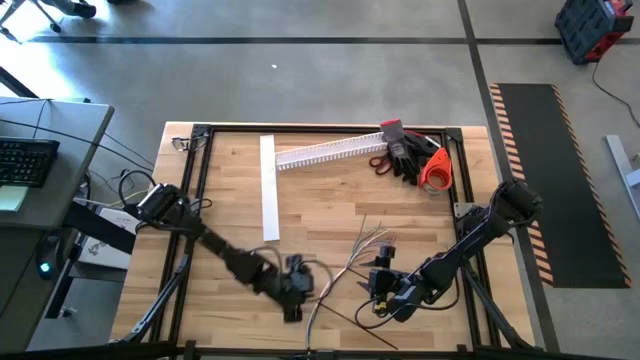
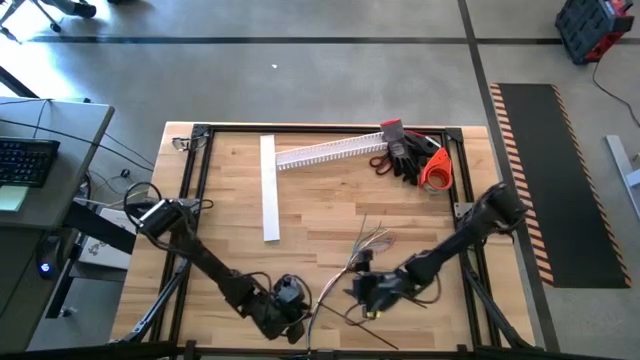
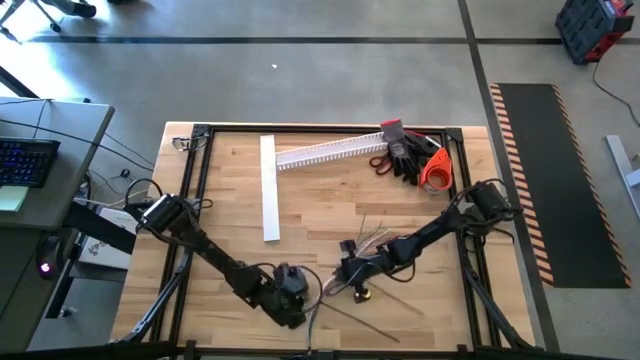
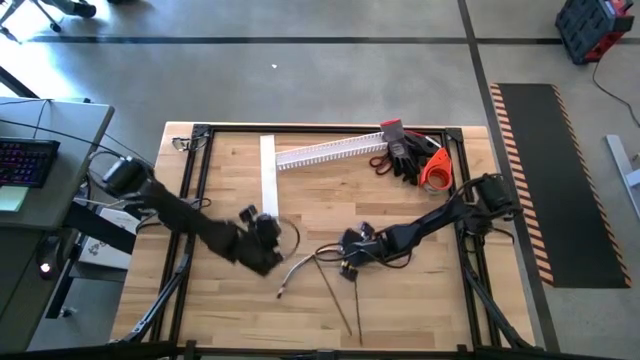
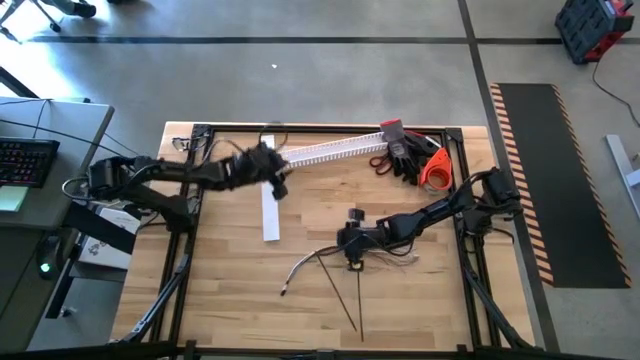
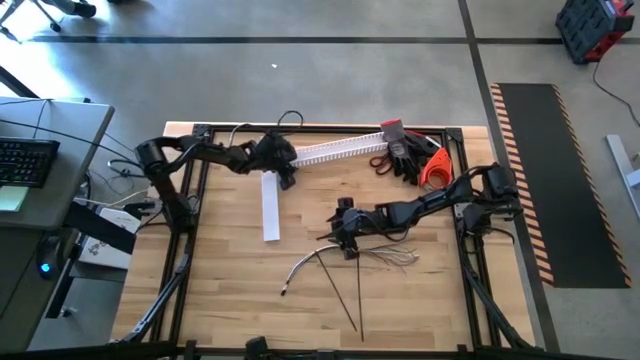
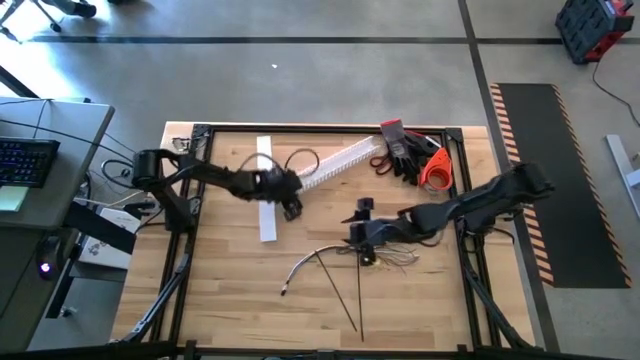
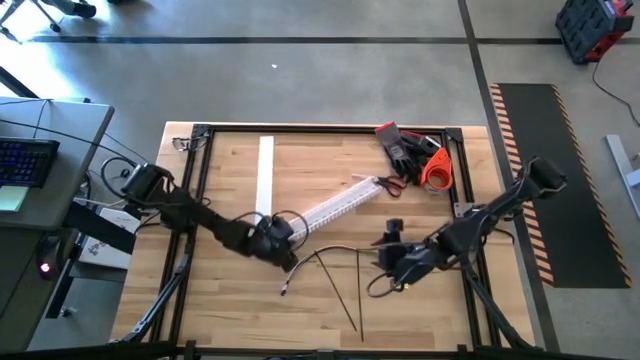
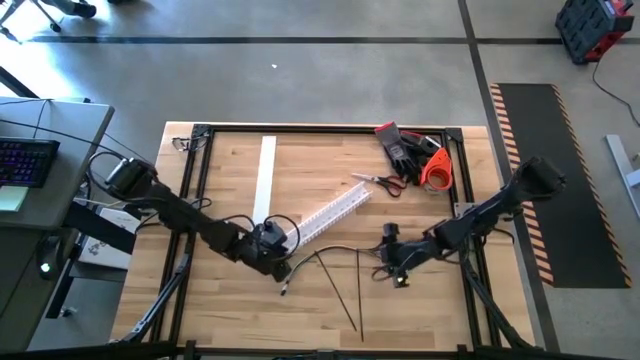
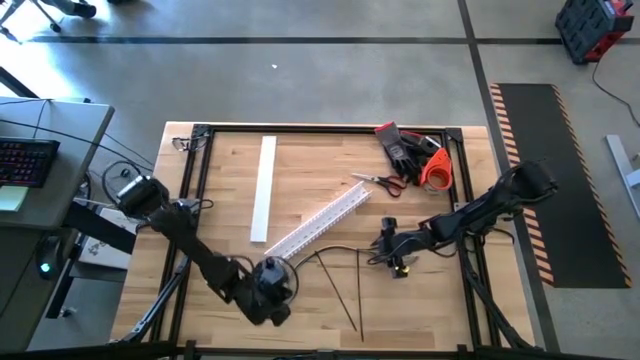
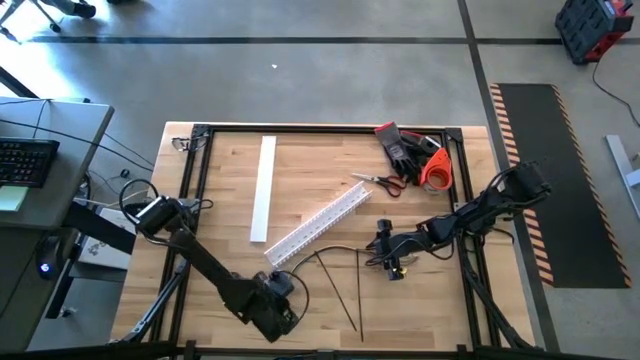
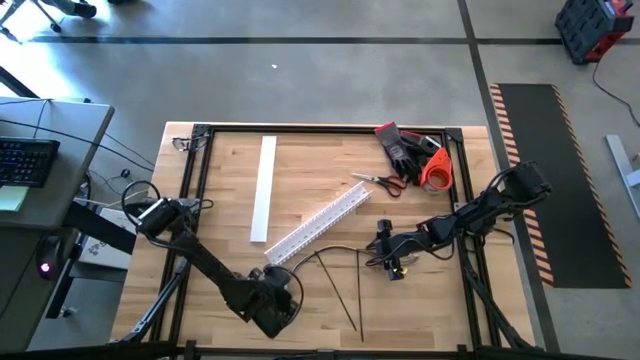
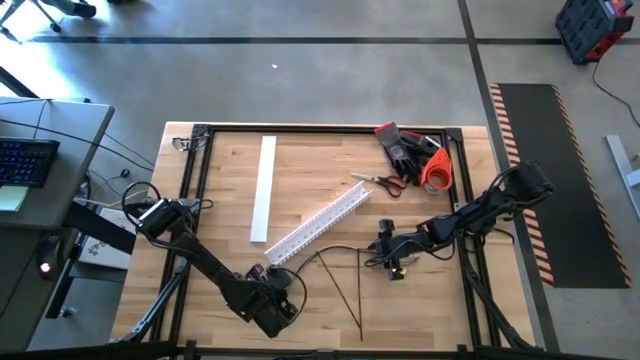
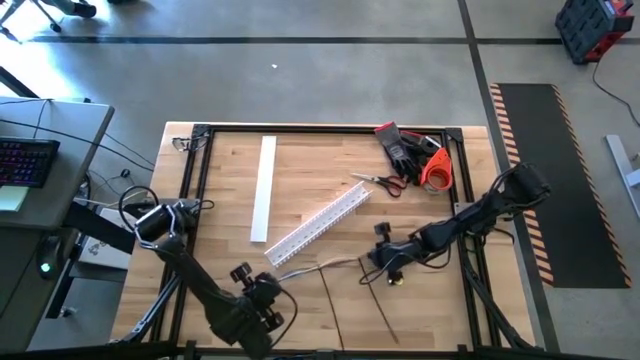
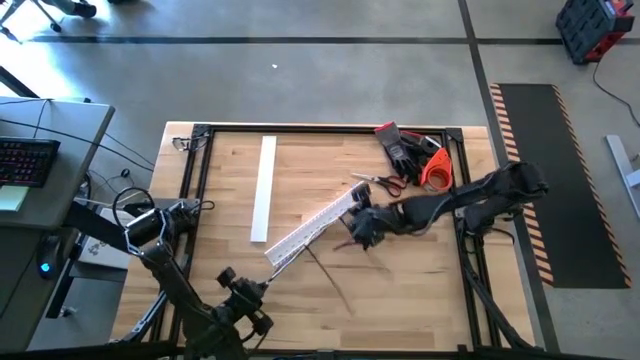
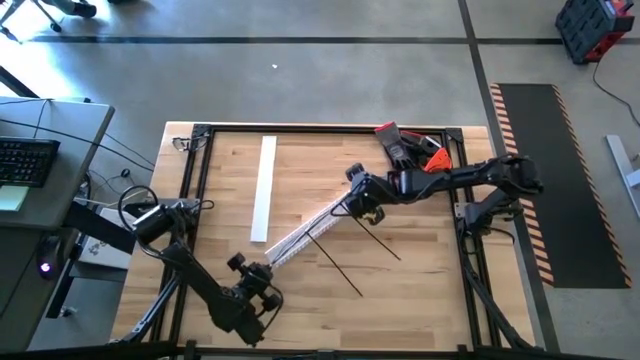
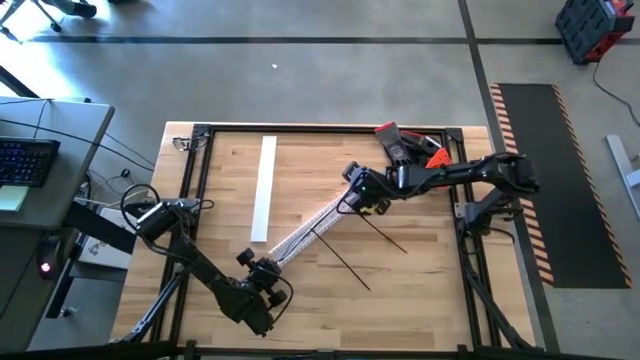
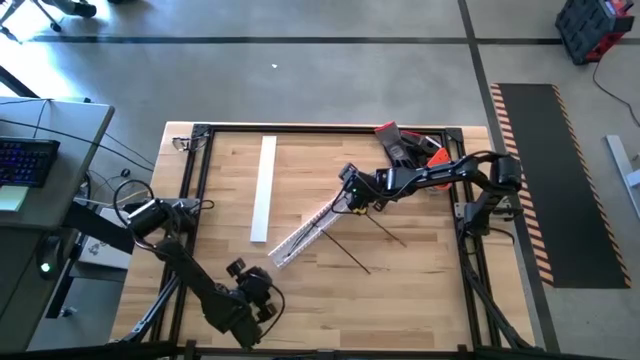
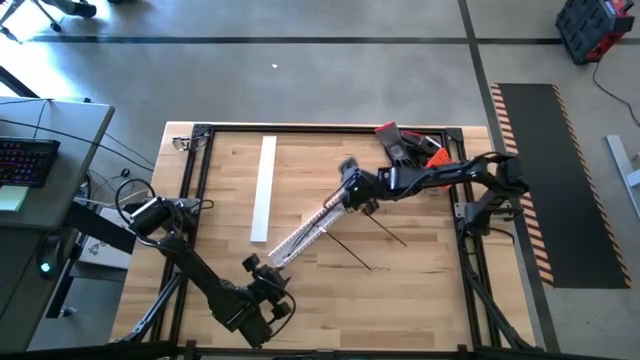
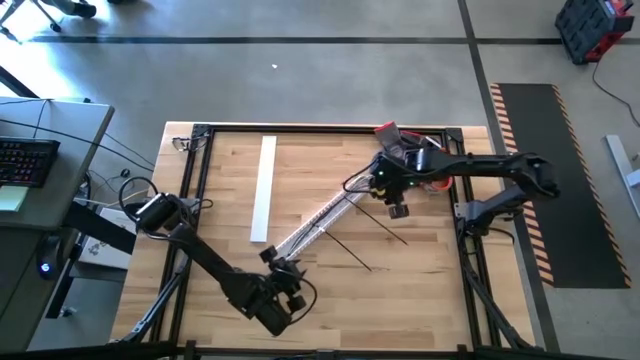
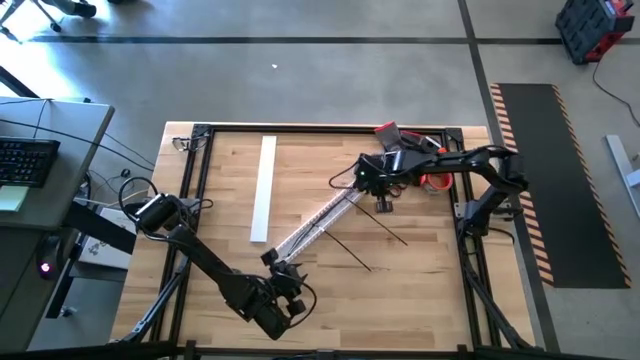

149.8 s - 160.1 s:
Task: Ziptie cables
Put the zip-tied cable wires into the white cable duct

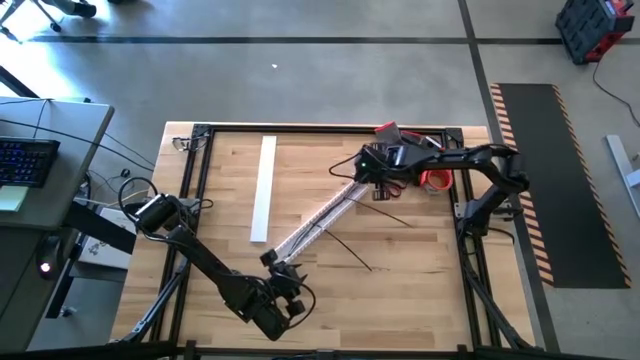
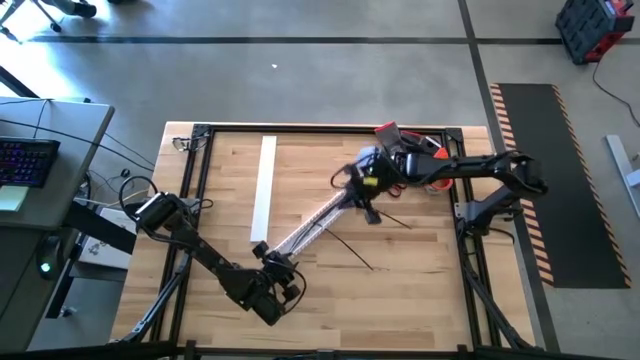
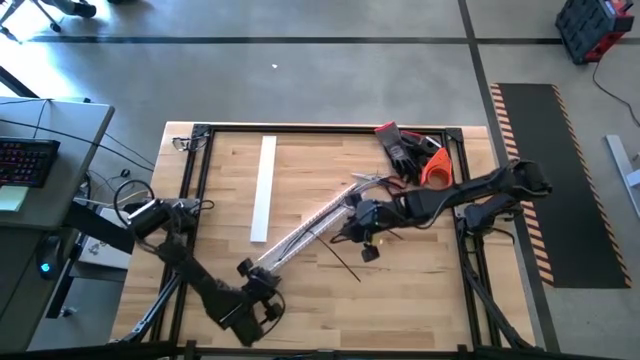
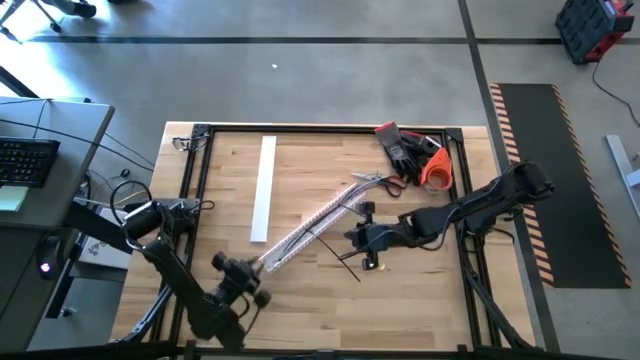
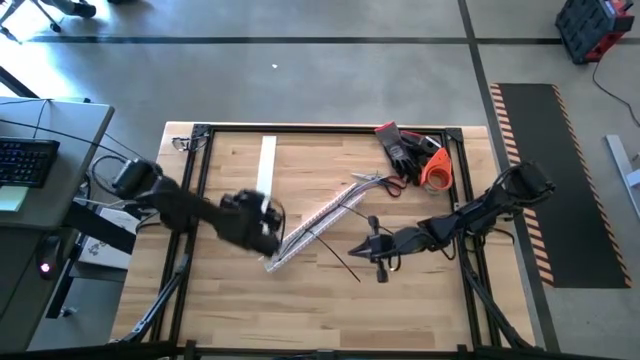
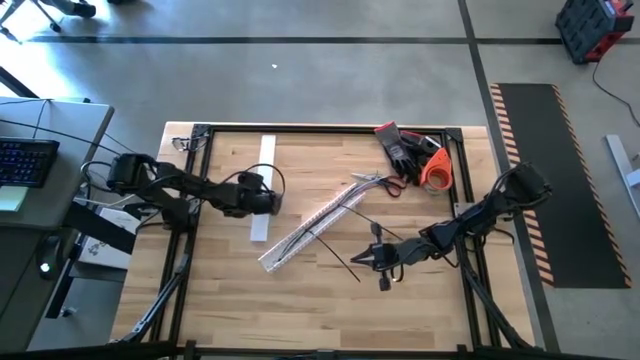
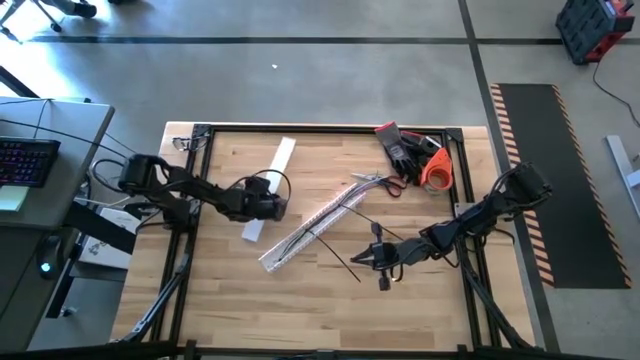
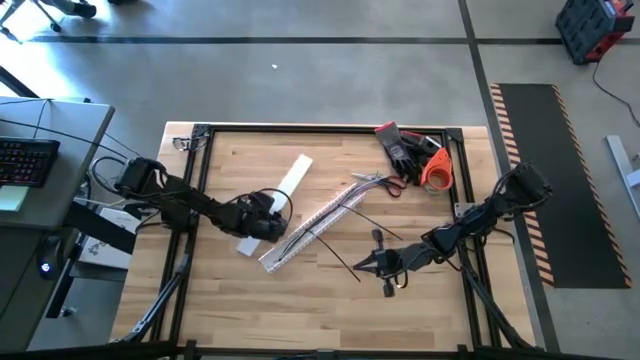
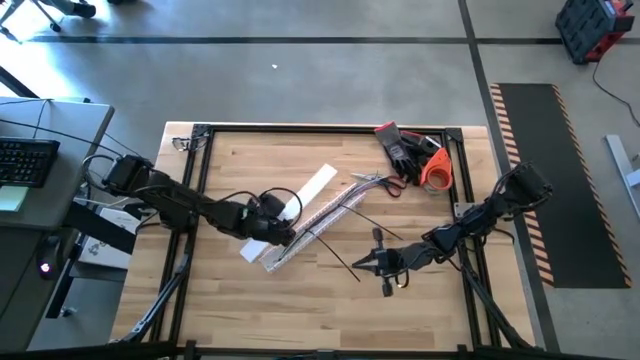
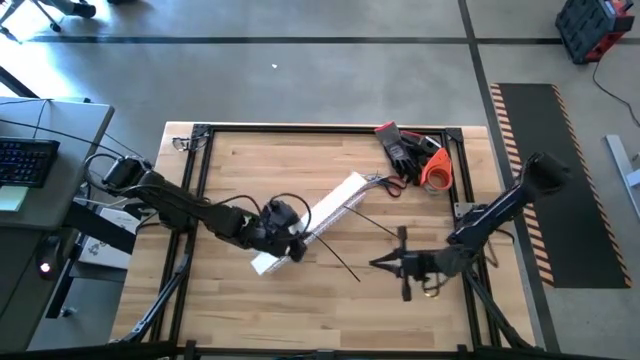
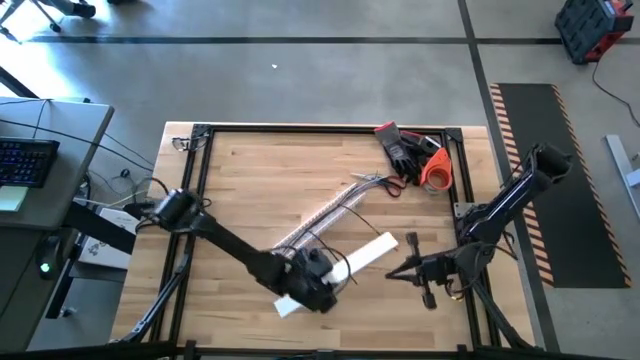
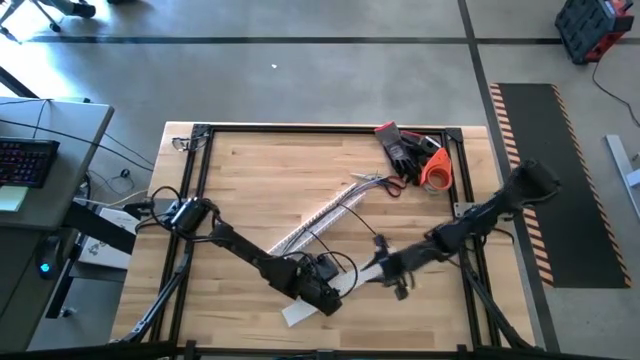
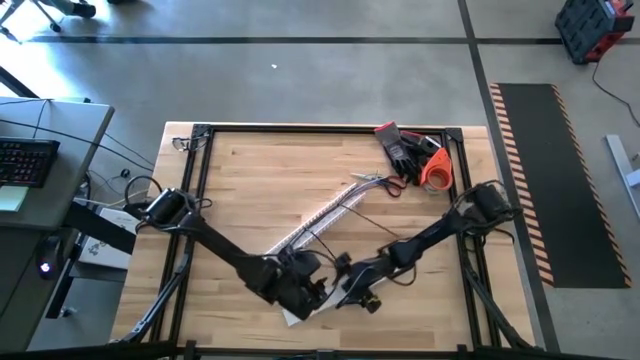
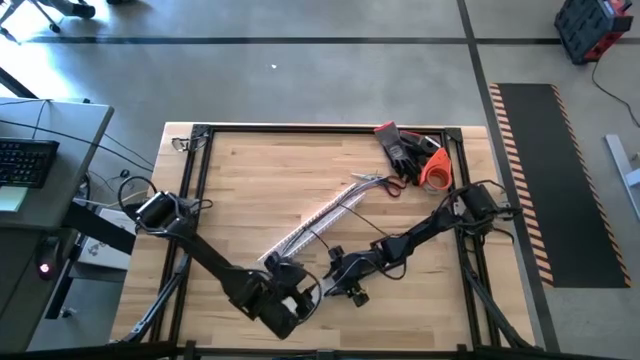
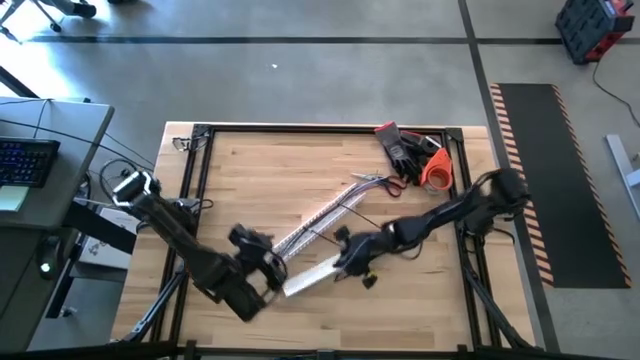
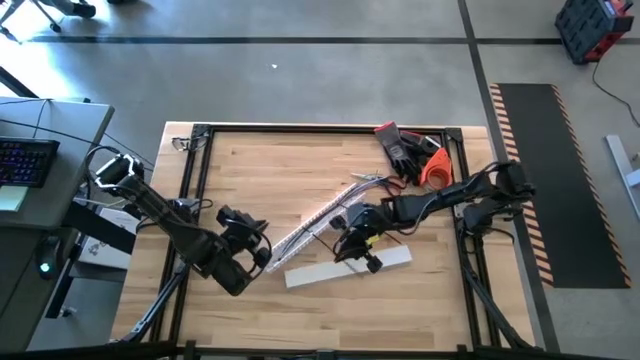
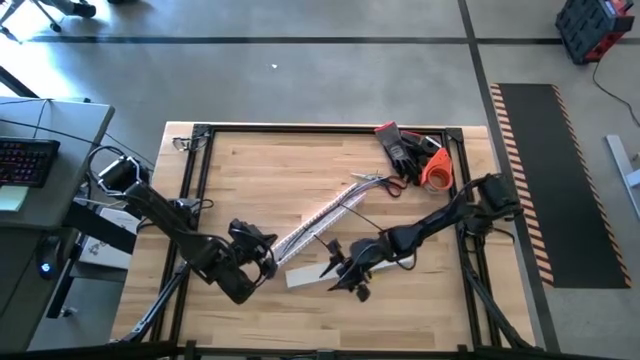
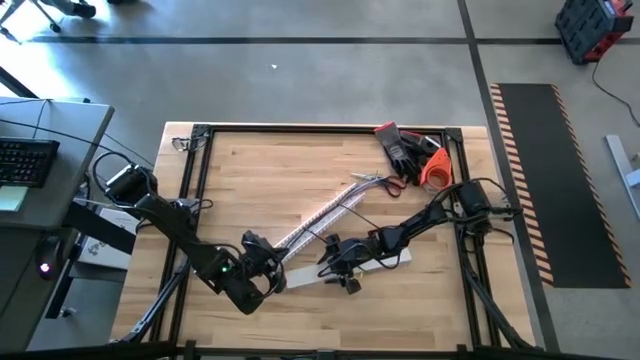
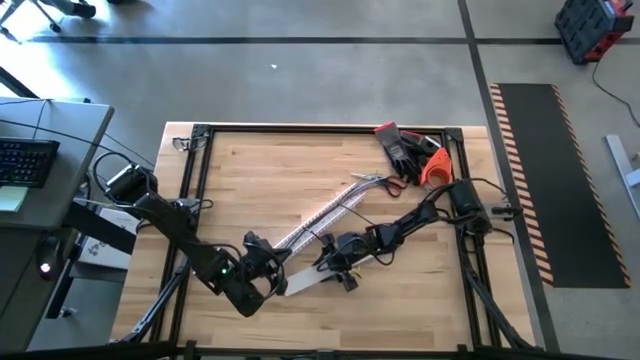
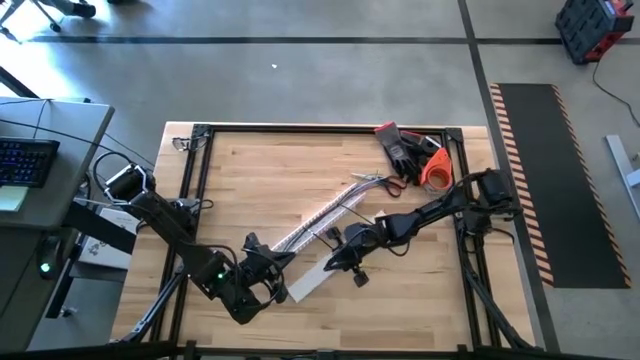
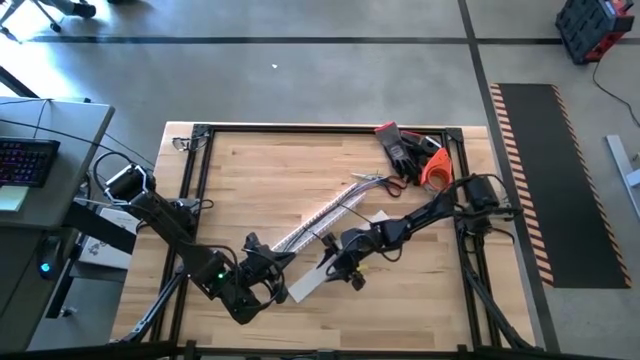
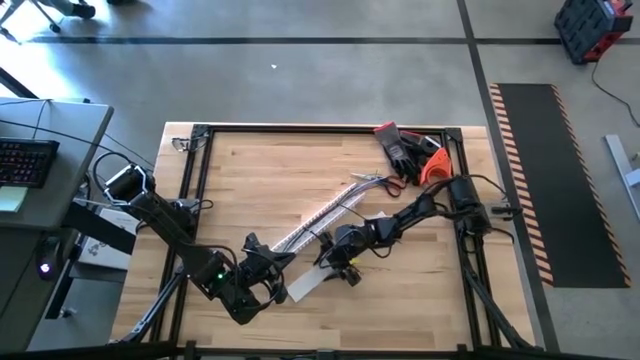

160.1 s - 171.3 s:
Close the white cable duct
